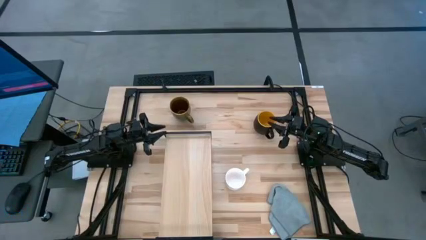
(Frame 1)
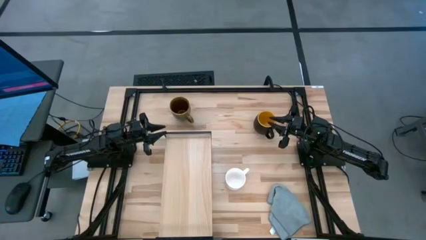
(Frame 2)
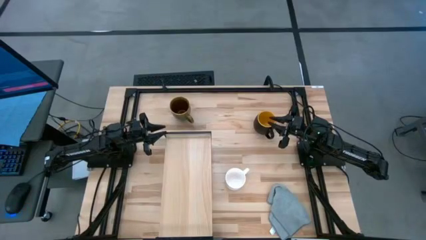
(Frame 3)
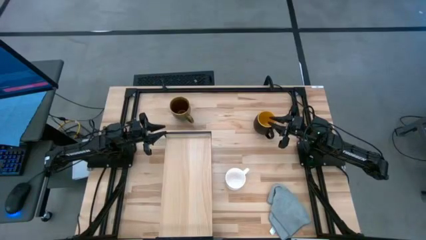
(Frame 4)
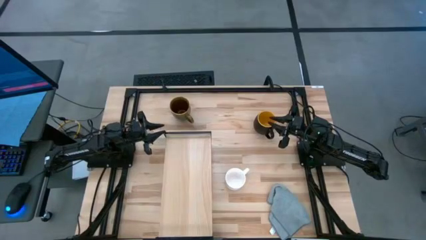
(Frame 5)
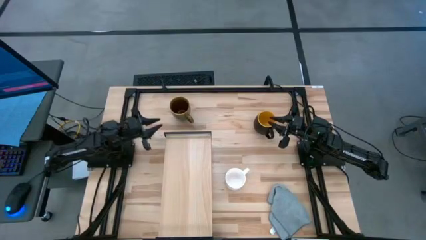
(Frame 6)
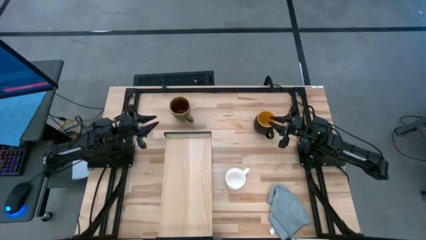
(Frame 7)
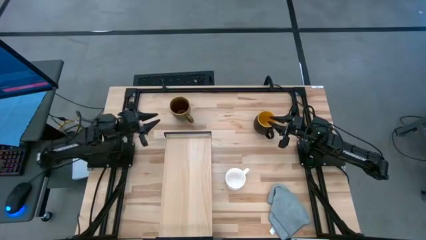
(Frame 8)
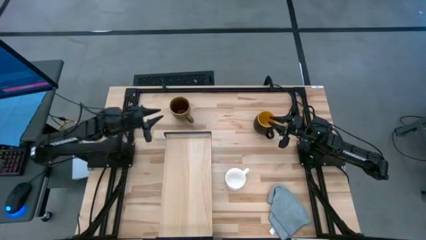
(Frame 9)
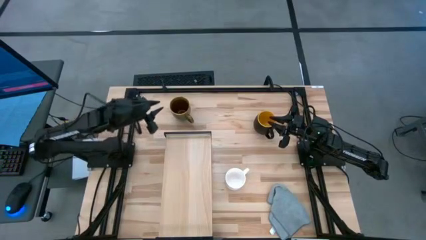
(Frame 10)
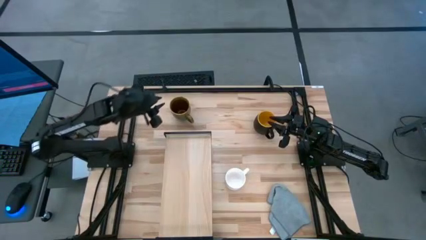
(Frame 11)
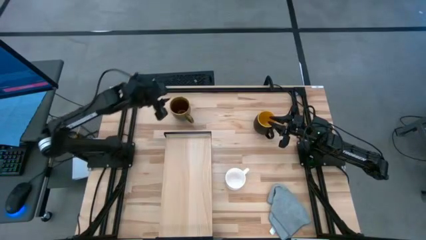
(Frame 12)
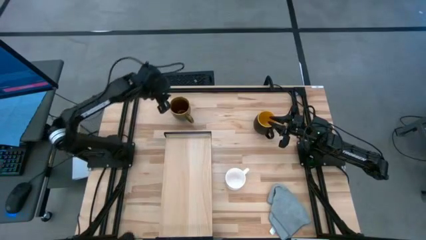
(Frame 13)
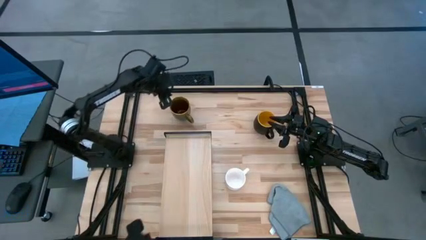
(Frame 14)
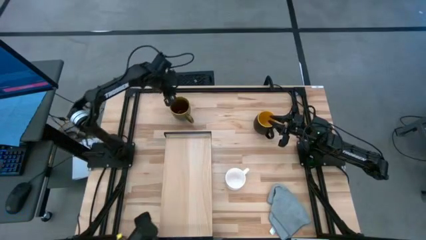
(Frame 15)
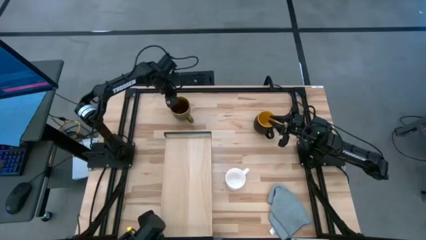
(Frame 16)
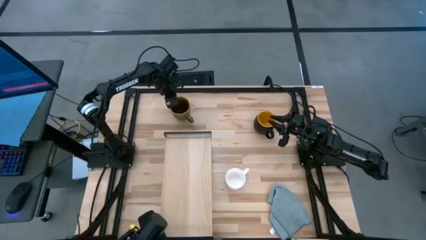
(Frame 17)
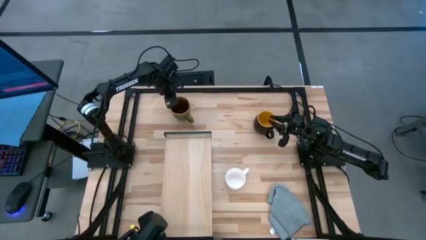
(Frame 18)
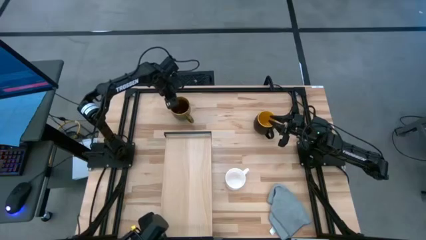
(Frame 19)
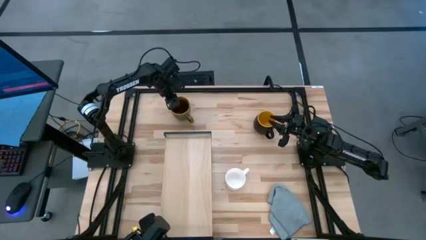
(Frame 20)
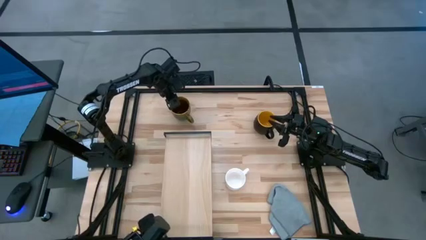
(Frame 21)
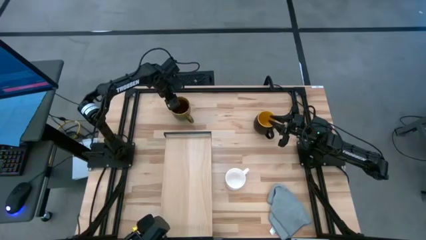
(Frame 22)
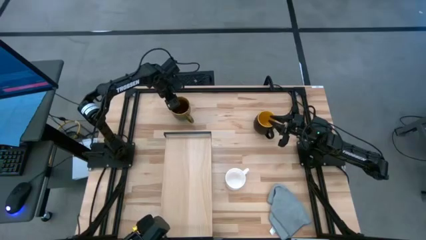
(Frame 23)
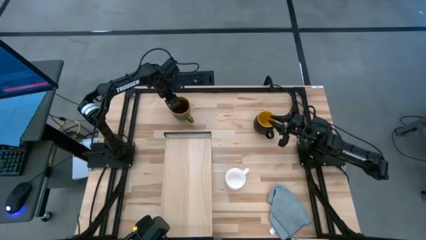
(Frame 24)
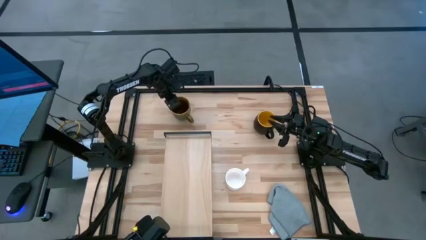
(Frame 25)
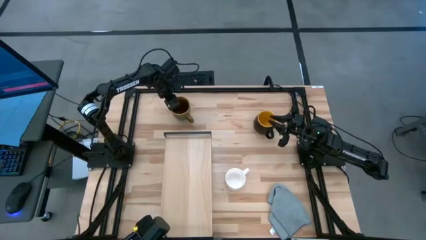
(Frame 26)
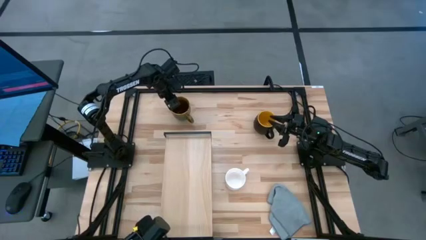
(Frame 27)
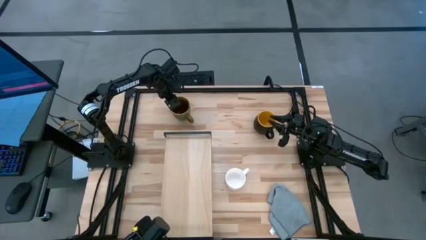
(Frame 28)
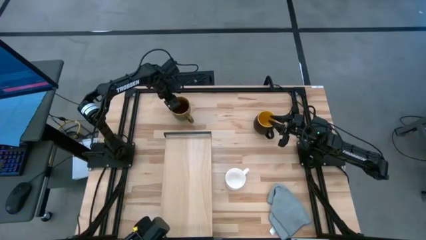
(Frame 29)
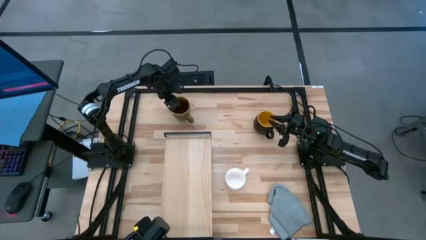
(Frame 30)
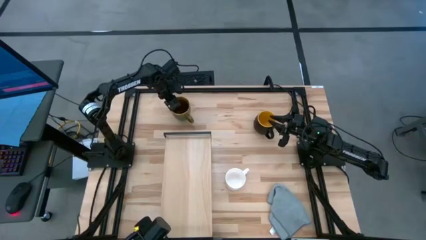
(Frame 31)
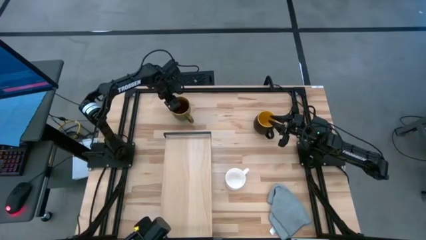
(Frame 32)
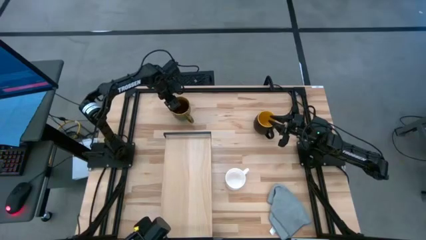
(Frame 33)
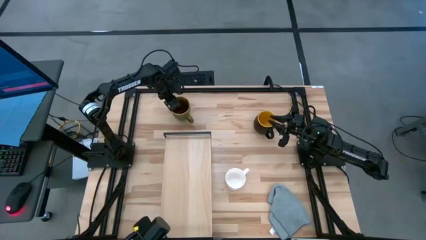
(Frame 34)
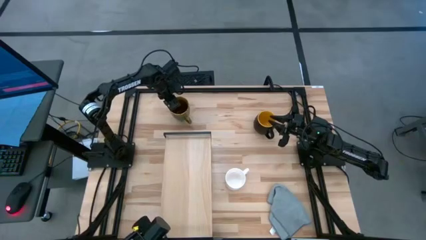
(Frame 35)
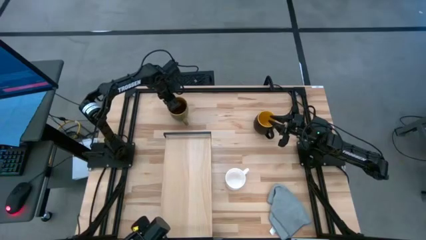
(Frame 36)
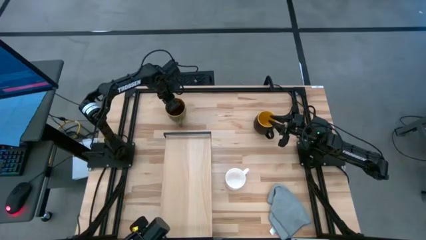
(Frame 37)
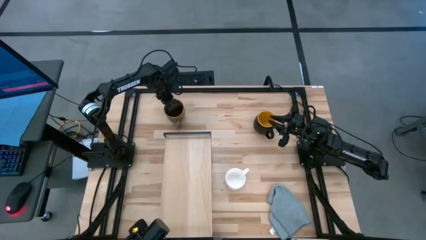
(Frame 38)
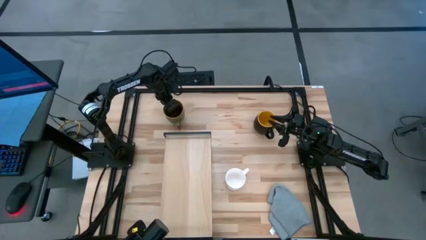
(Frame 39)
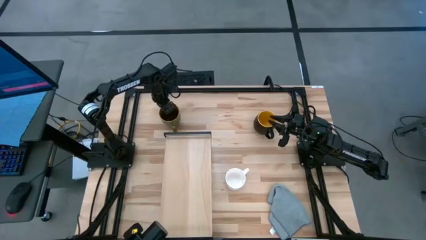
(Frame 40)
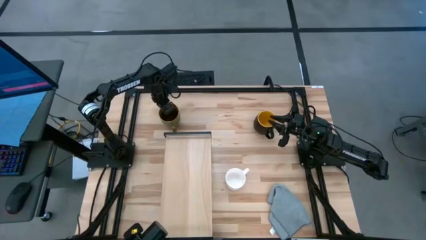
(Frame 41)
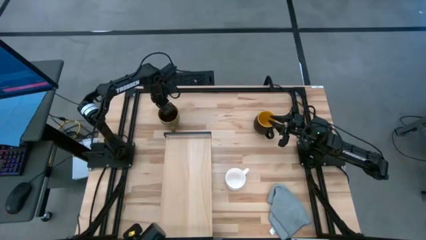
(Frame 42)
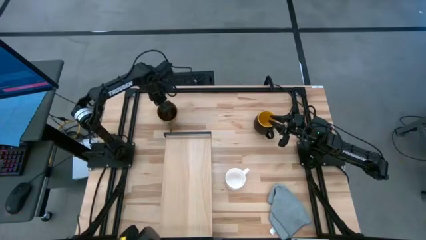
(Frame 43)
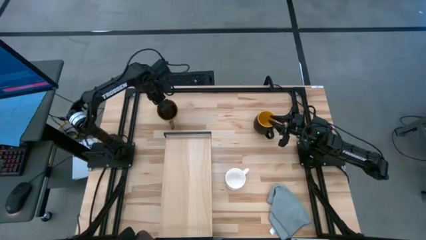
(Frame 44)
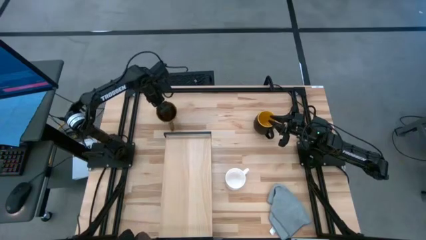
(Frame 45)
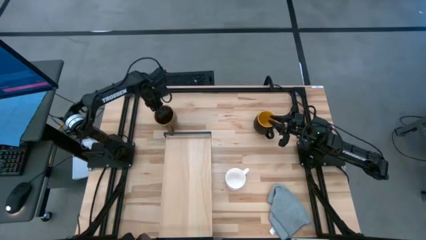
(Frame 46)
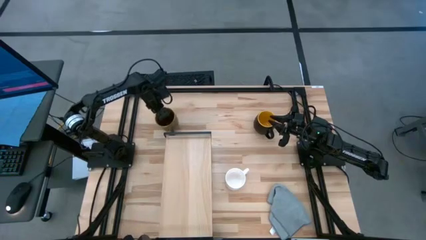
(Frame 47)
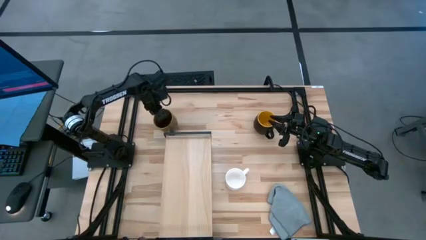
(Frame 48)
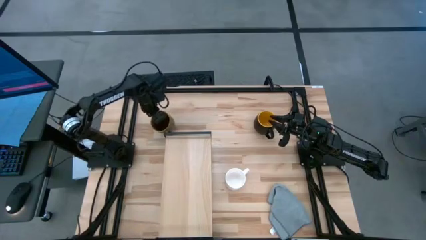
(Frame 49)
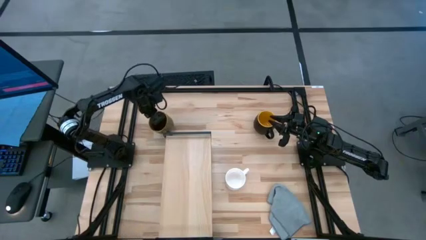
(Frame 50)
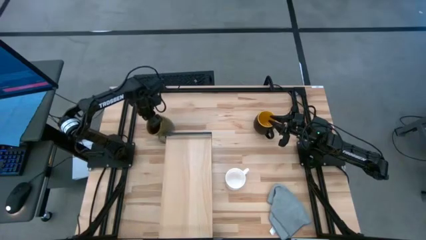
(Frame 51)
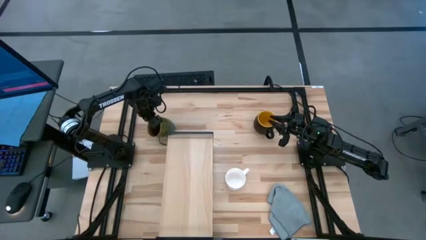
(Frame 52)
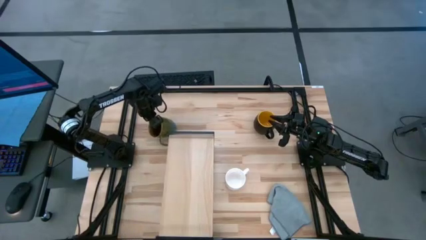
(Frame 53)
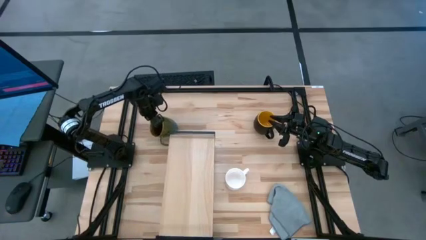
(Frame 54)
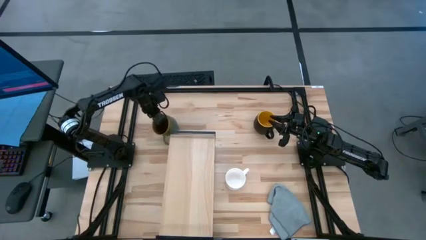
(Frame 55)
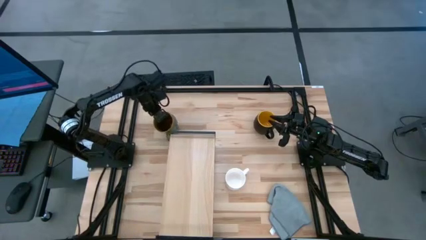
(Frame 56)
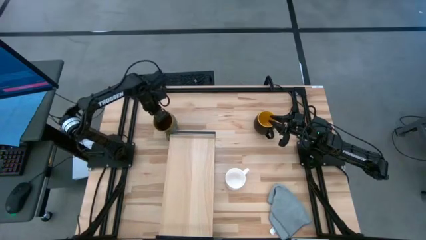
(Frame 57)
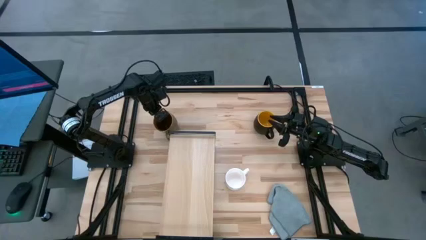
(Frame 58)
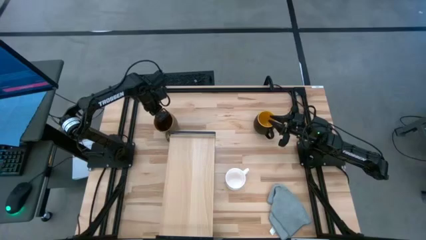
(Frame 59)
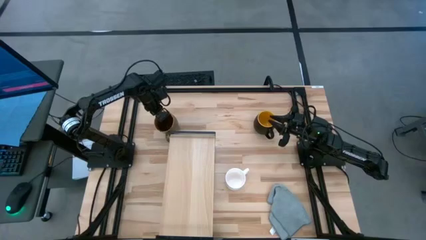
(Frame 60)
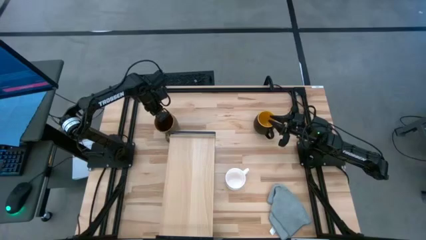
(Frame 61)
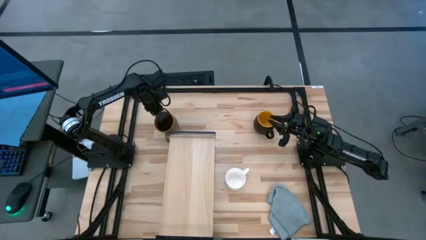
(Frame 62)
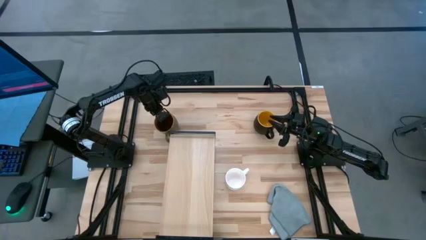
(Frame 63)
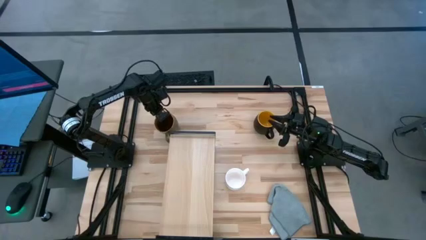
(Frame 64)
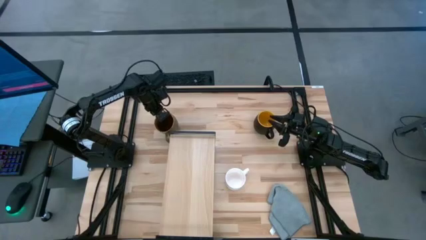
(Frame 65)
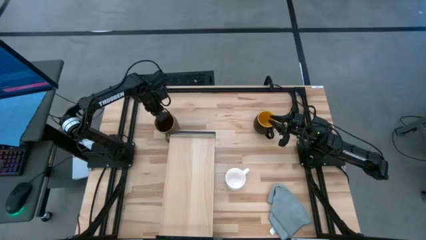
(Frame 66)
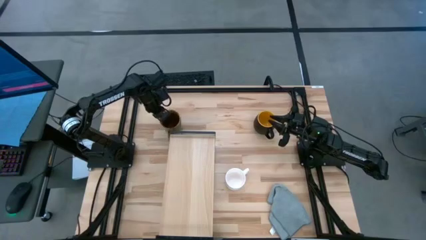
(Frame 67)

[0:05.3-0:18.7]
Task: Stack small to large cups/mugs on shelf
Put the brown mug on the shelf

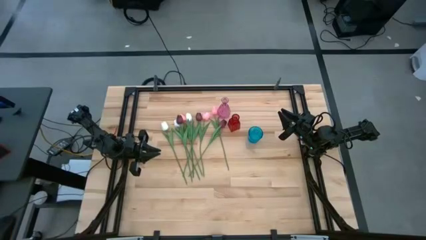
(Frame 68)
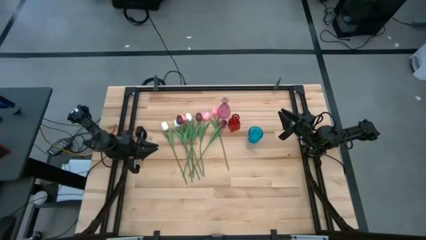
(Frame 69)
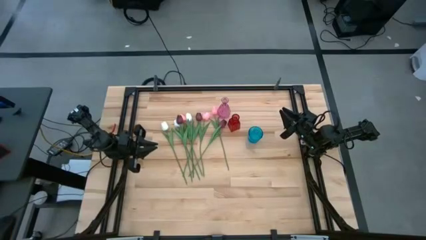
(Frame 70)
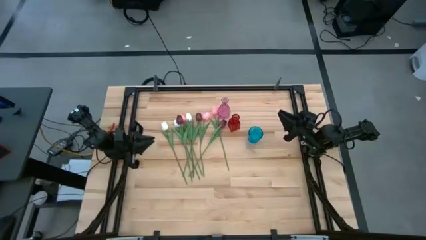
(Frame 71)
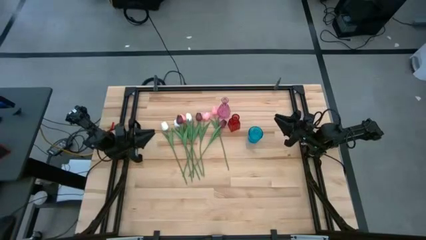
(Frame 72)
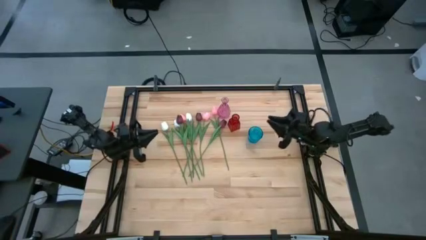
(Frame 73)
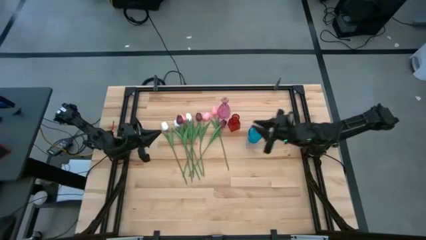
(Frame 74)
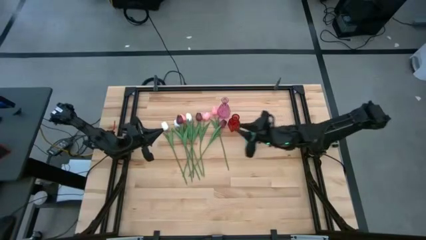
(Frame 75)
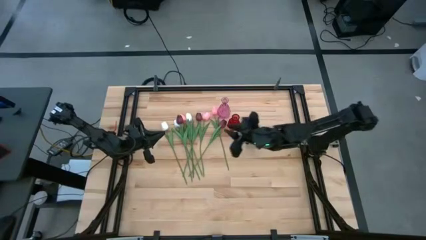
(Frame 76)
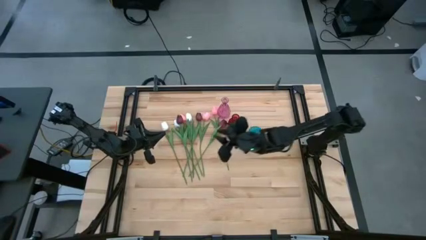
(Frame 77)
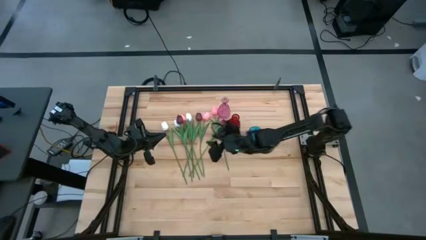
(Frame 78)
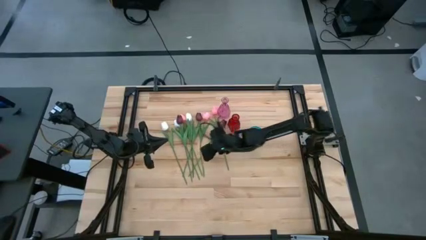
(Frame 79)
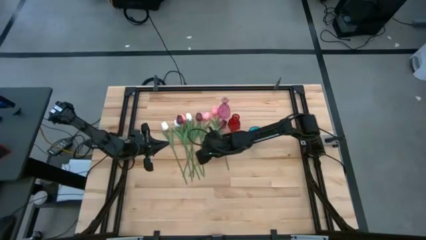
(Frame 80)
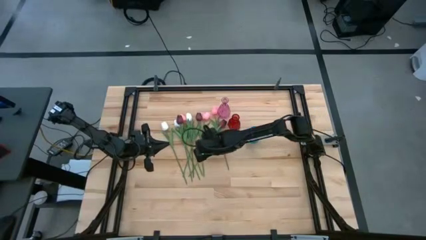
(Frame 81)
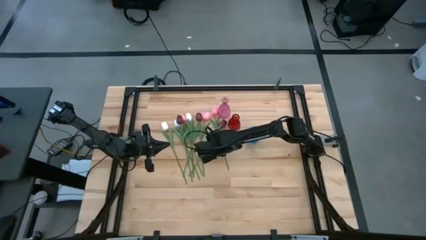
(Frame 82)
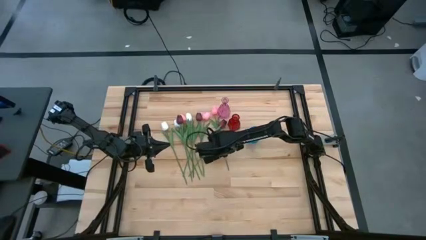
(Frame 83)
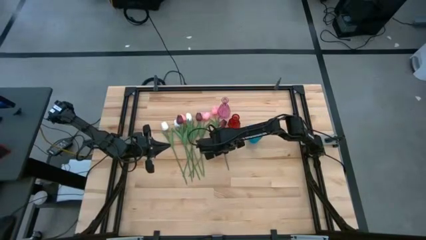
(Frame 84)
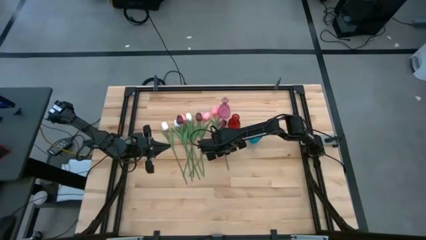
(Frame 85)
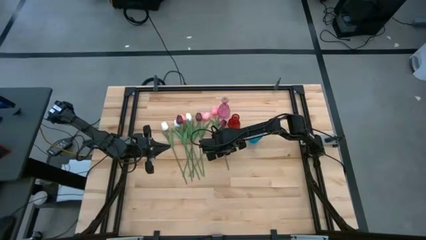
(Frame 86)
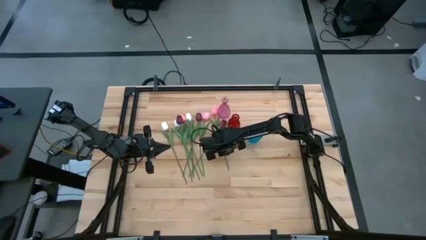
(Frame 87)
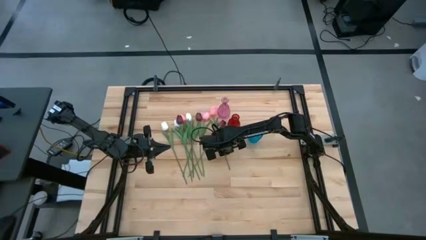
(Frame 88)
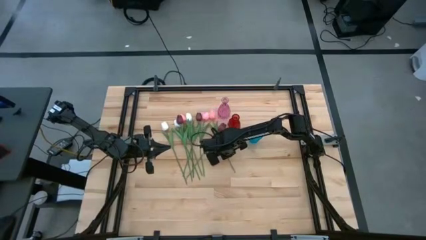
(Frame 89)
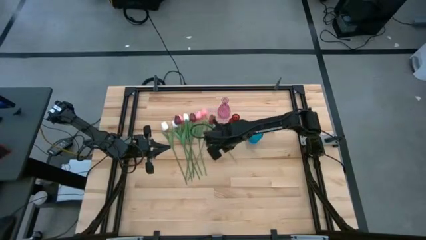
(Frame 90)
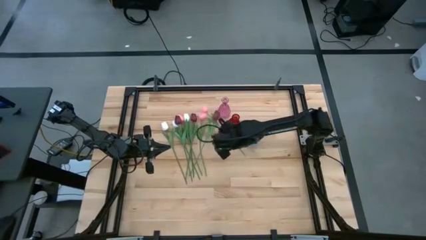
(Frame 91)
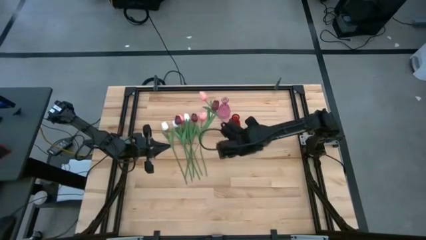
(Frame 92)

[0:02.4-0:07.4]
Task: Sort flowers into vase by color
Put the pink flower into the pink vase
